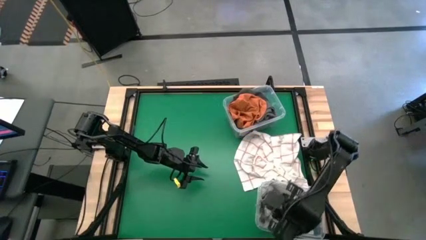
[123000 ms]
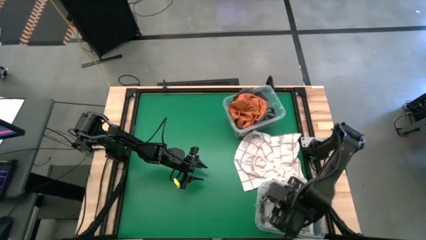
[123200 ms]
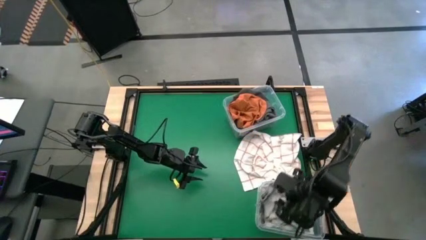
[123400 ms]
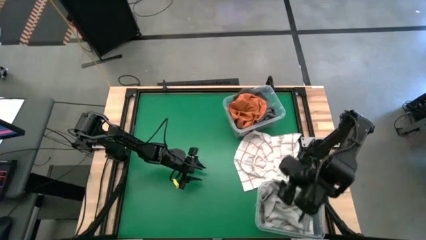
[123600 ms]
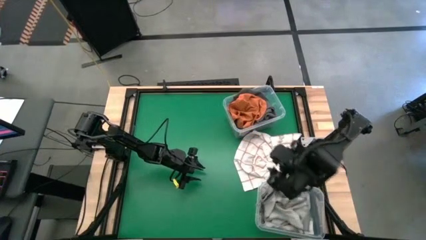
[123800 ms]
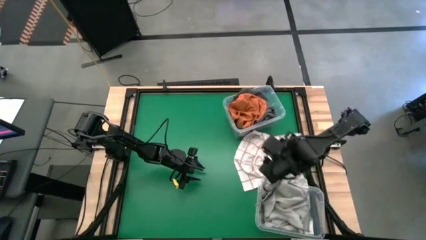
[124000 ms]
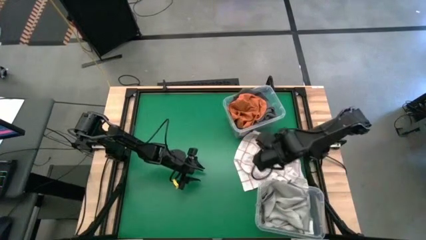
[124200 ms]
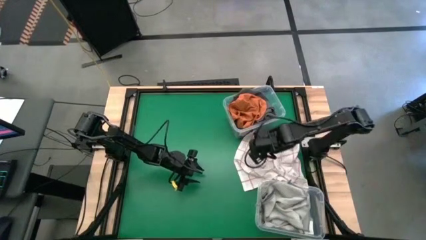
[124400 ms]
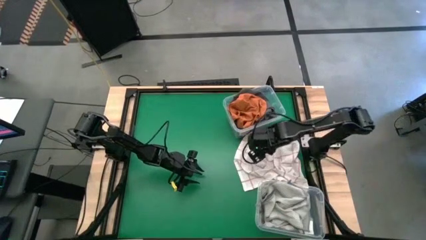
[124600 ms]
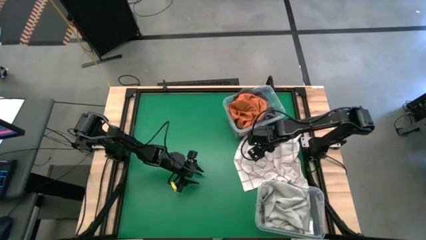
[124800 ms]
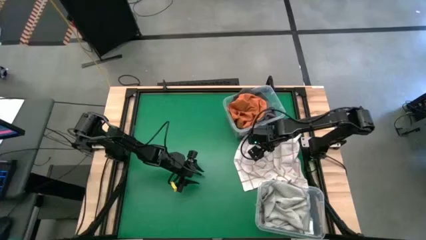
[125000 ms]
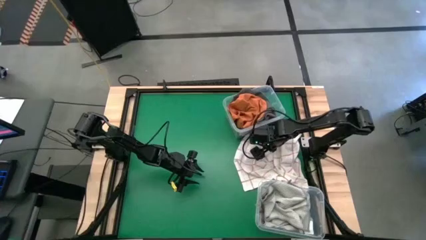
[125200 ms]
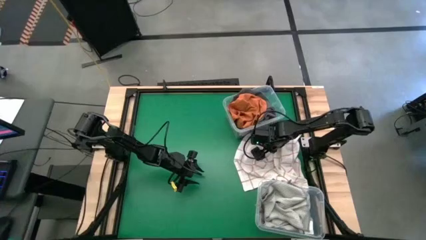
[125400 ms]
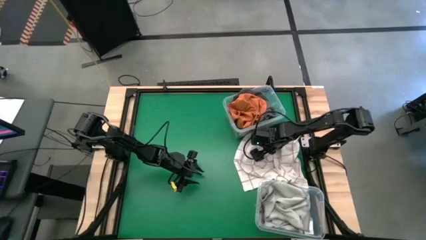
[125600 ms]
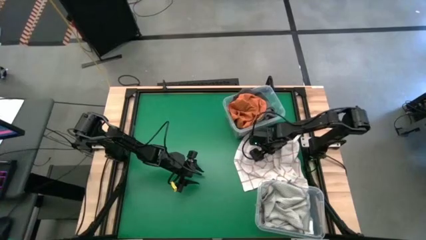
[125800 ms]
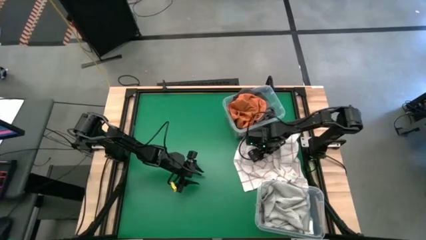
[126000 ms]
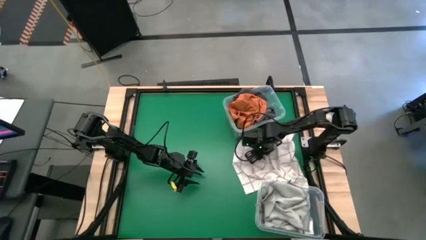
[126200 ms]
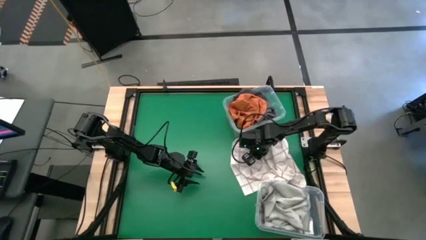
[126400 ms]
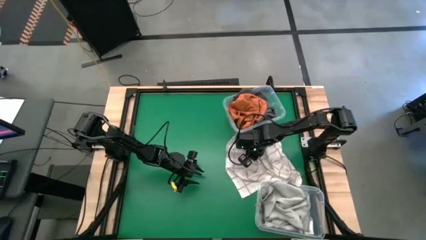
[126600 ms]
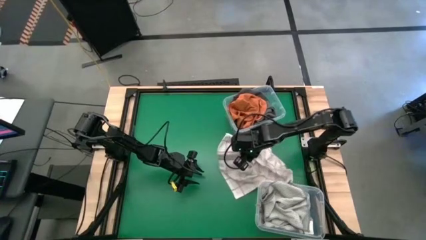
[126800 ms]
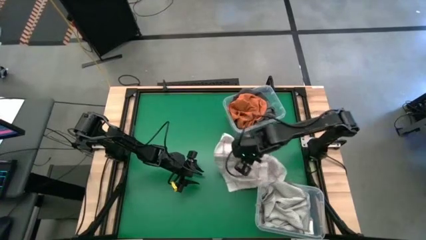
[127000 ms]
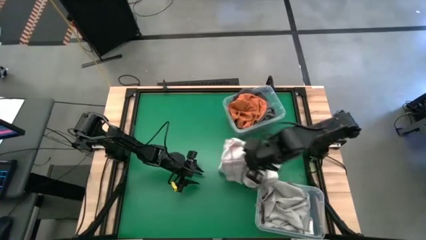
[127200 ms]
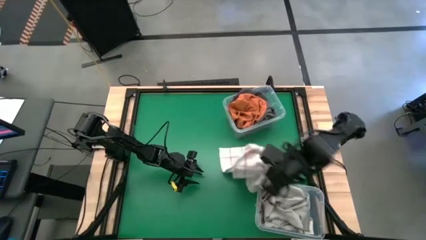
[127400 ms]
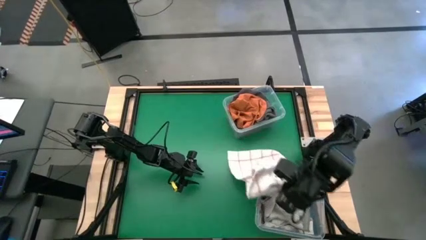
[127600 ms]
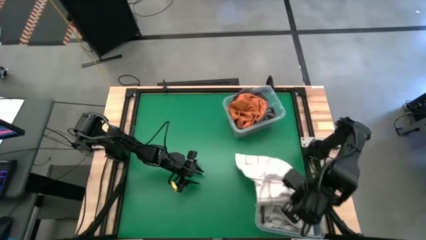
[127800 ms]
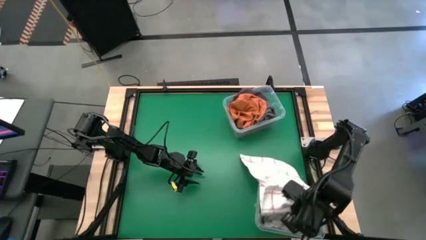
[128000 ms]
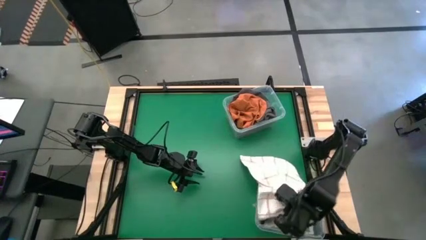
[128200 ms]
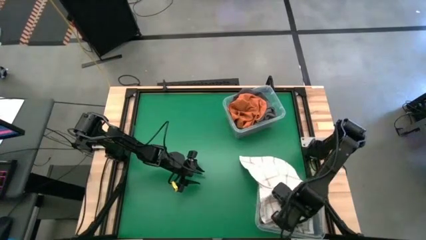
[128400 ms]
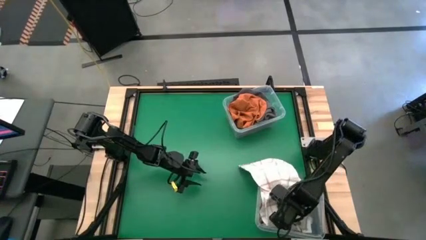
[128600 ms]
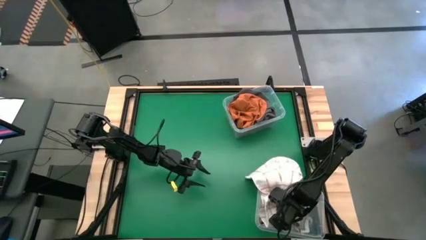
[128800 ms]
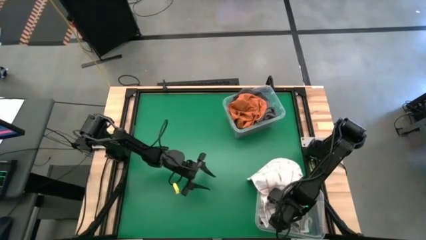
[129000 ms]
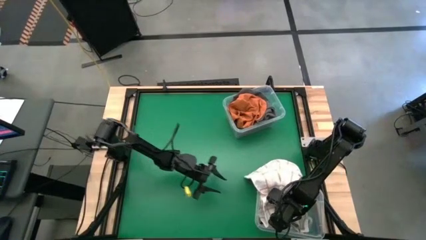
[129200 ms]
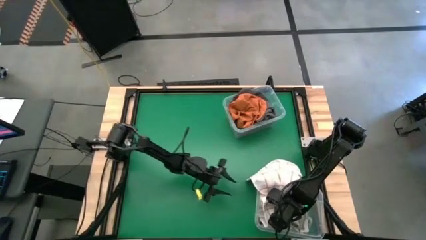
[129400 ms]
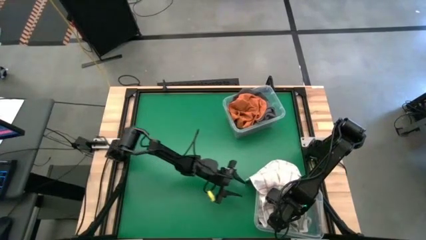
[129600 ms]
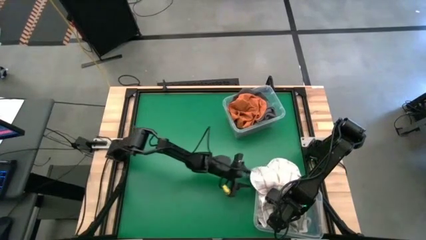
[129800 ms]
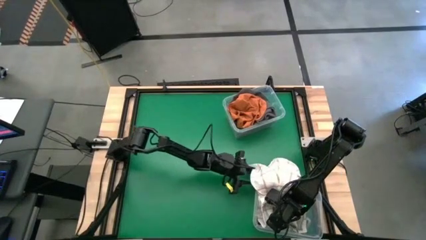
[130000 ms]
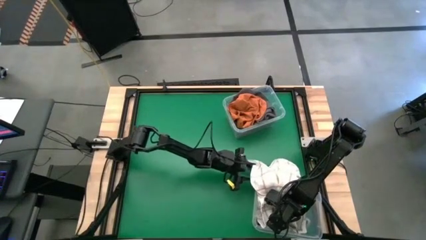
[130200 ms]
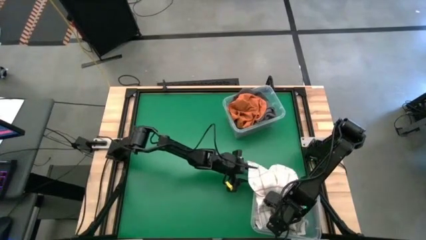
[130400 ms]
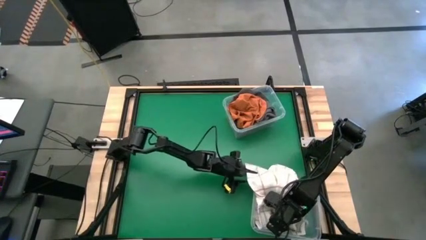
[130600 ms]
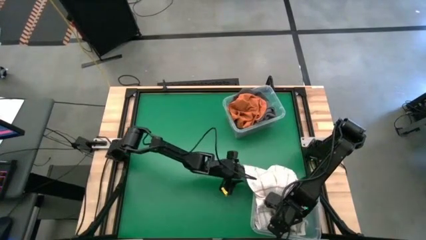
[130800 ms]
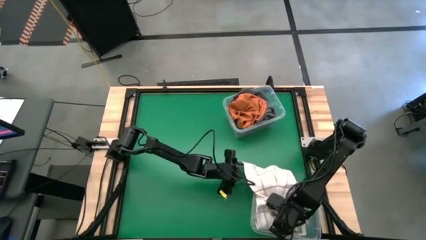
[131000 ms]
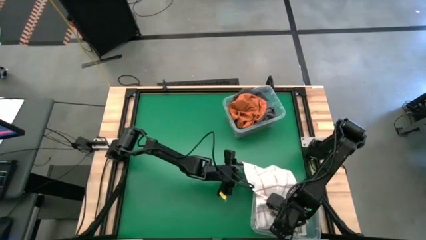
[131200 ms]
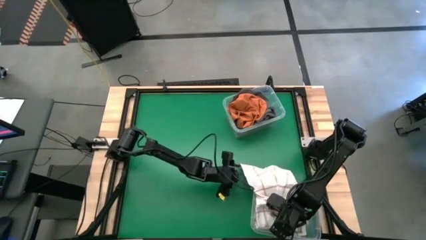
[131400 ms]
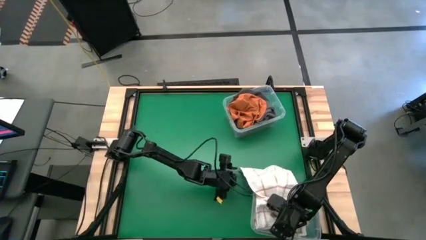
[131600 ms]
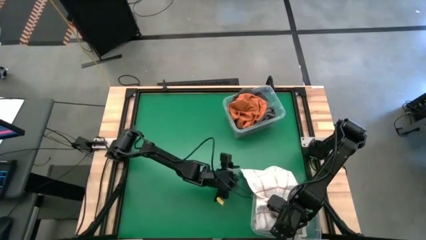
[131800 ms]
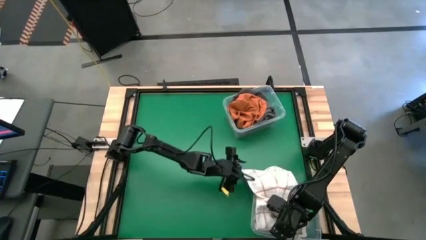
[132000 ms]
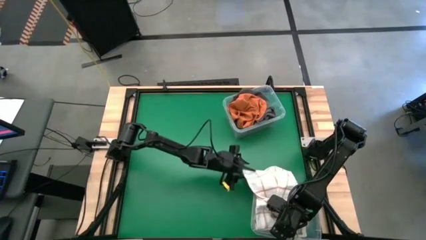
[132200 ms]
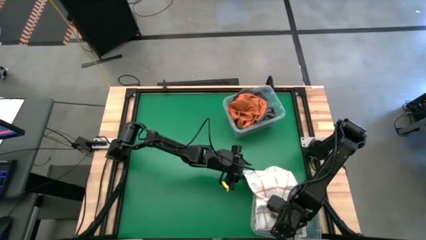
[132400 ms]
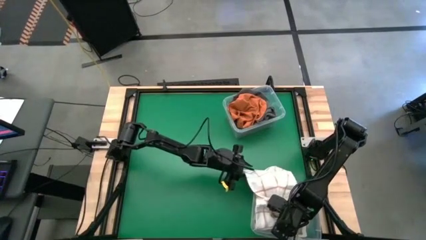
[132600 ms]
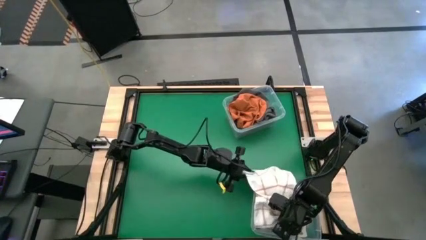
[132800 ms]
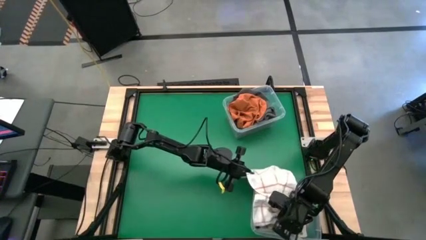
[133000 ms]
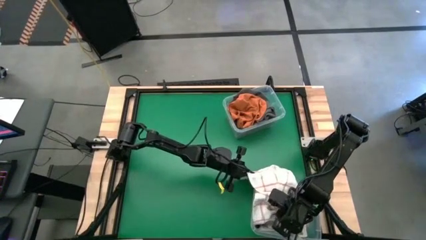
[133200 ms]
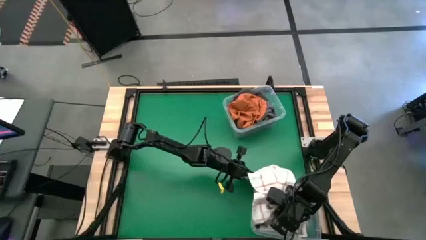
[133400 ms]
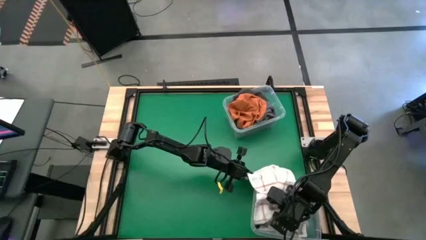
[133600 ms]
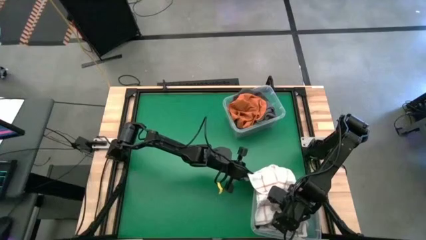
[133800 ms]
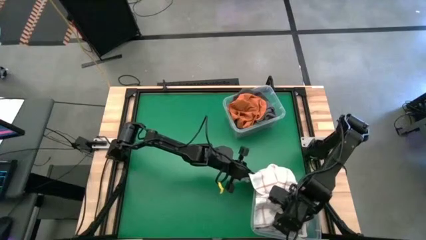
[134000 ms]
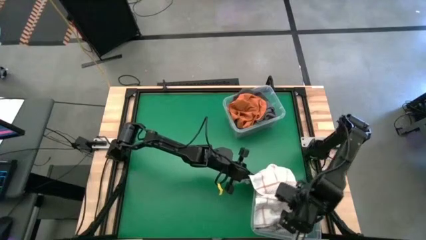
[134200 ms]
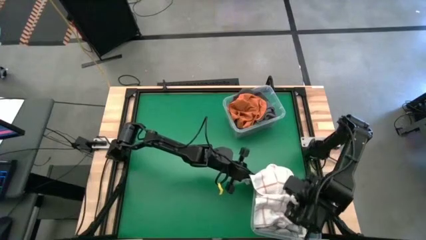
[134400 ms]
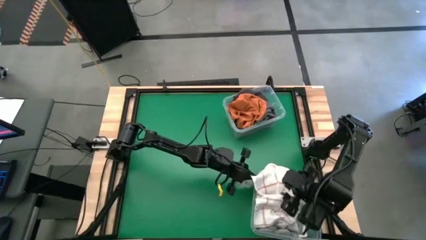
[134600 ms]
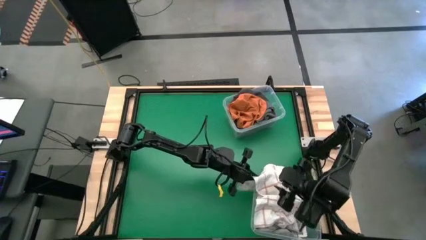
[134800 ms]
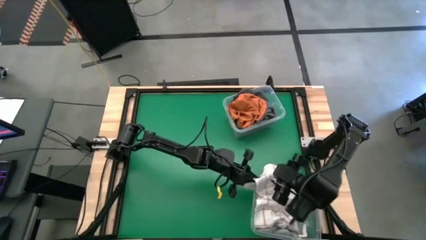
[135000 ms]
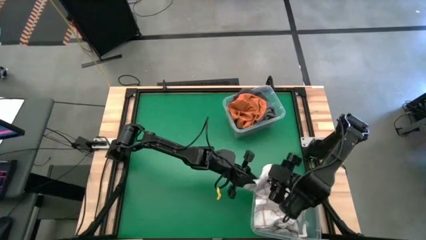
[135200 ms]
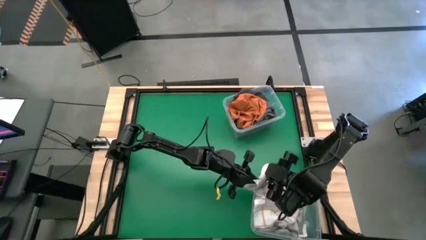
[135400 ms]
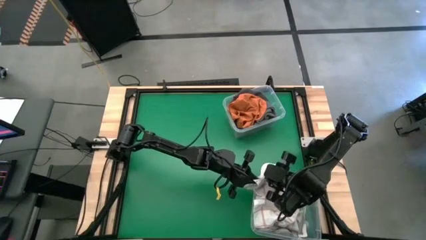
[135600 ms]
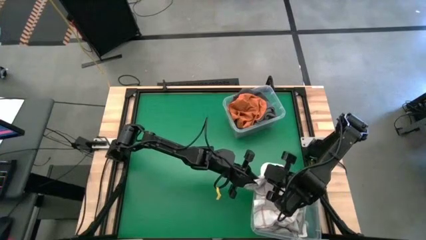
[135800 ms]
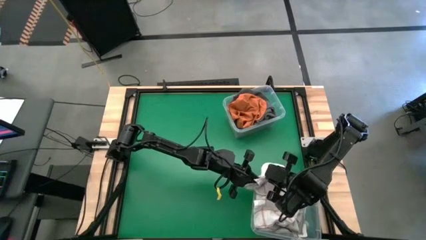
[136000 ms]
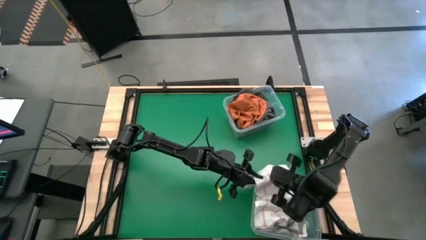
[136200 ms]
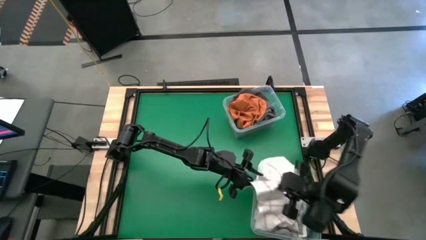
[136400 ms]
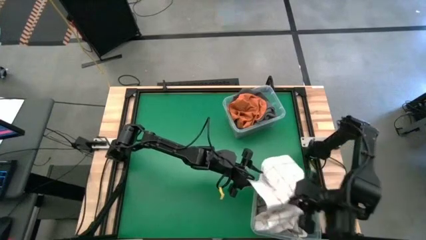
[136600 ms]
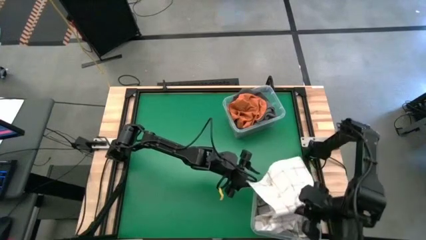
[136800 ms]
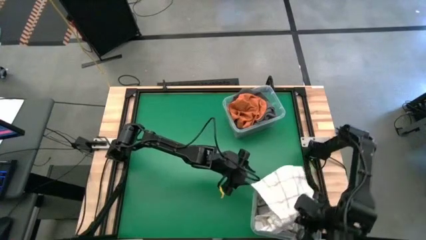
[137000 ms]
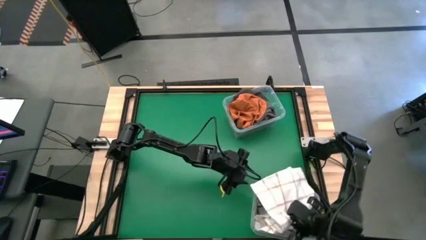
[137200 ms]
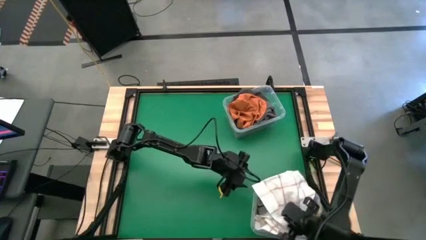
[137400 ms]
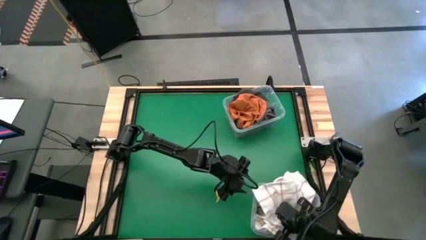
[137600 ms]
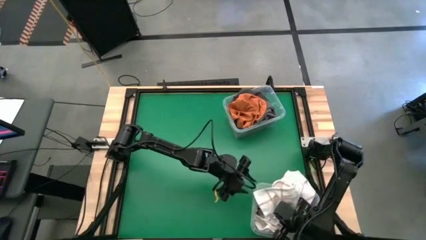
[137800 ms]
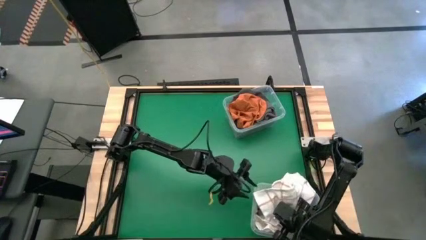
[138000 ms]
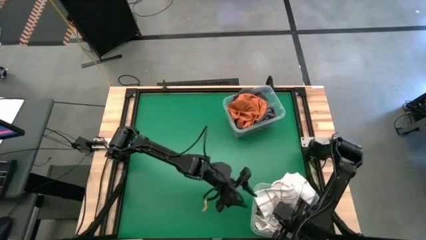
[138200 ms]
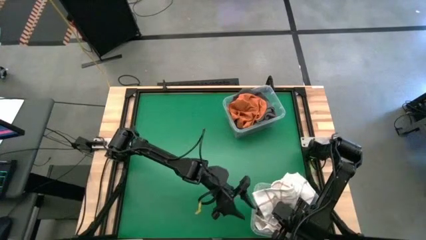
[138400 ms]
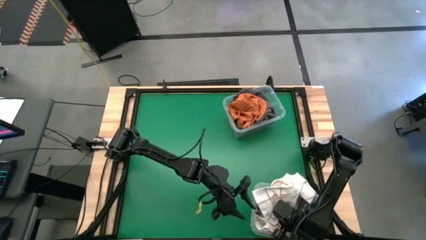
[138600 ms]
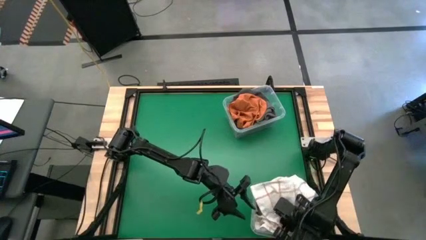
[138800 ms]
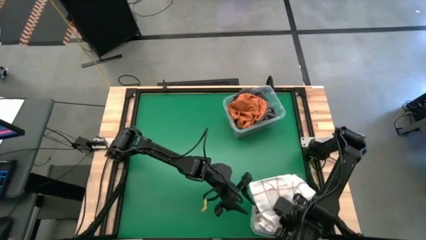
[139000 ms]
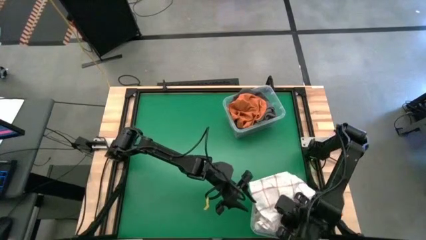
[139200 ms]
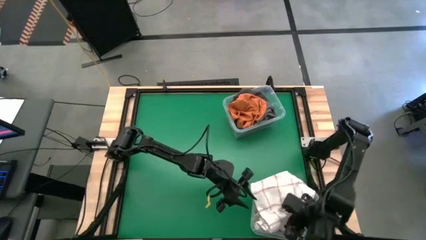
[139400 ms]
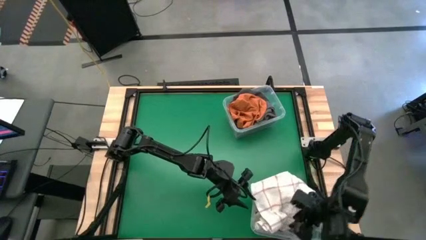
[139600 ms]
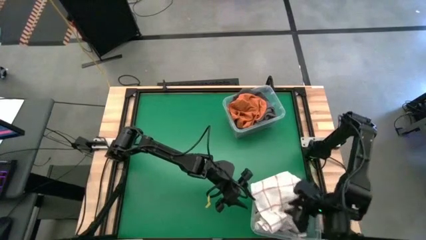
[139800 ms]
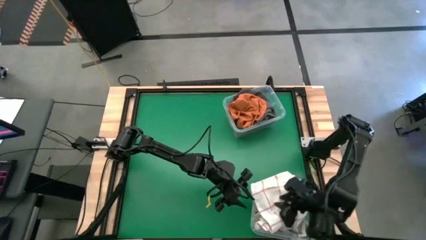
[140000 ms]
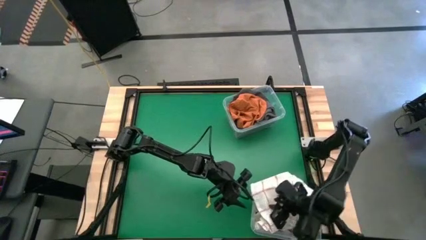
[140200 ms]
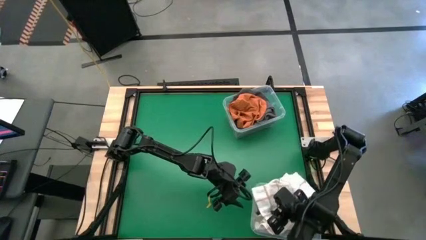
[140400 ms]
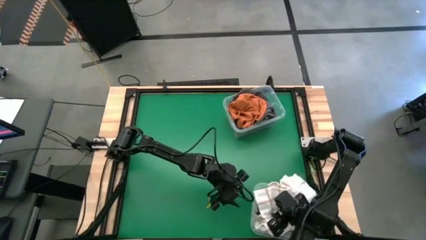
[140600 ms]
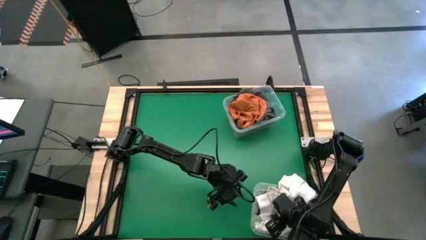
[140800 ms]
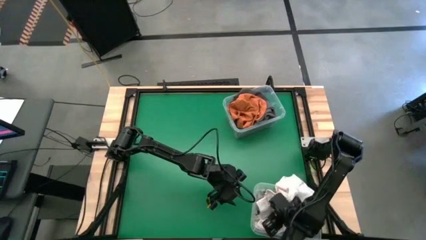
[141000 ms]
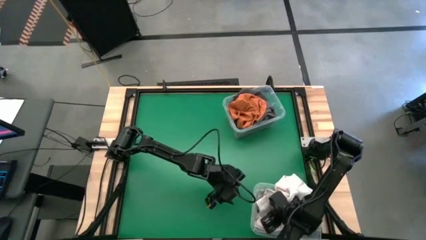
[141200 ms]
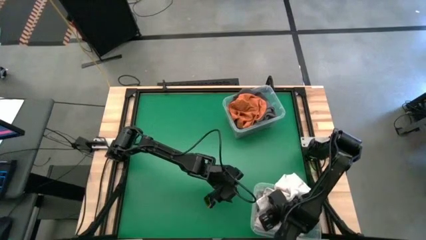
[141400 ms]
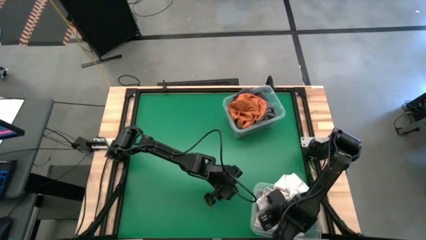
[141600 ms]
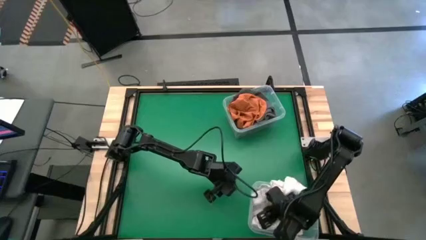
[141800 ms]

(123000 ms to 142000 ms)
Task: Sort towels by color in basket
Put the white patterned towel into the bottom transparent bin
